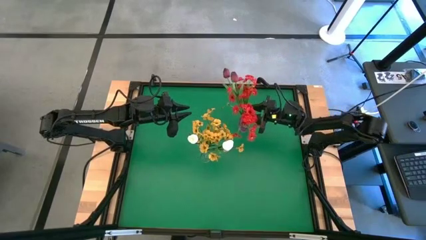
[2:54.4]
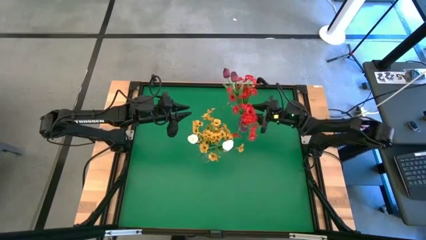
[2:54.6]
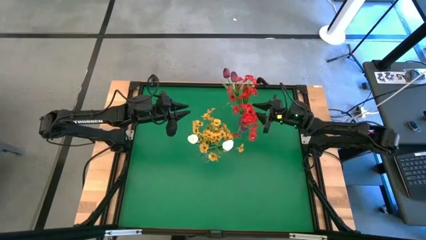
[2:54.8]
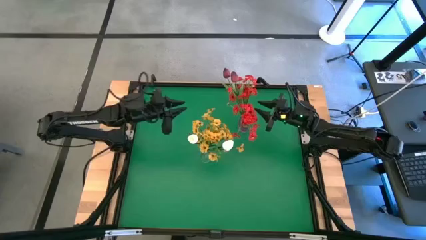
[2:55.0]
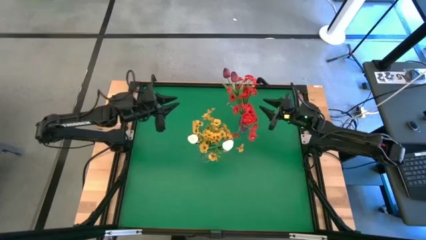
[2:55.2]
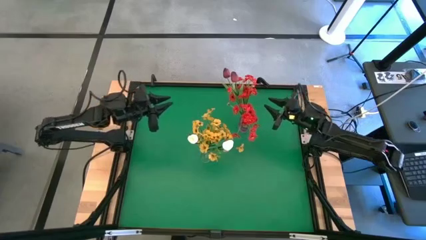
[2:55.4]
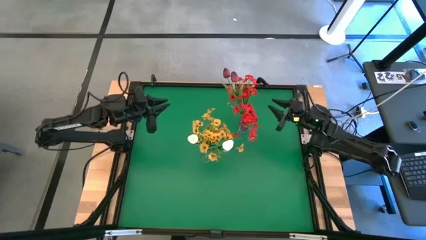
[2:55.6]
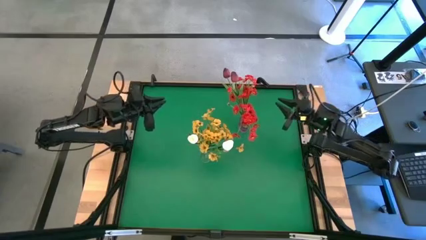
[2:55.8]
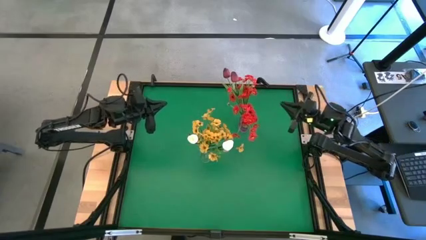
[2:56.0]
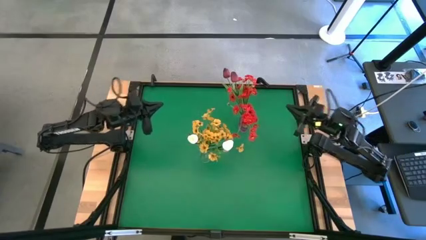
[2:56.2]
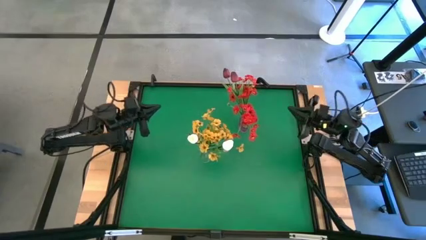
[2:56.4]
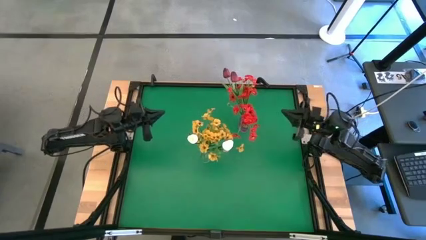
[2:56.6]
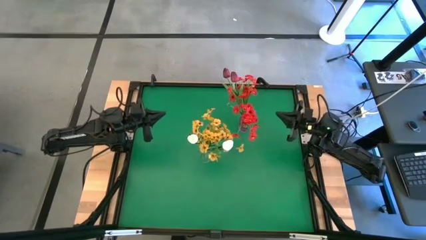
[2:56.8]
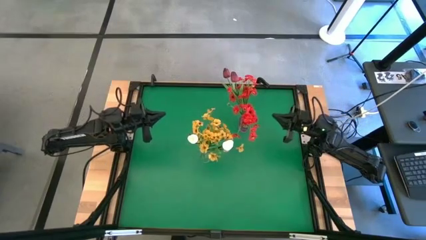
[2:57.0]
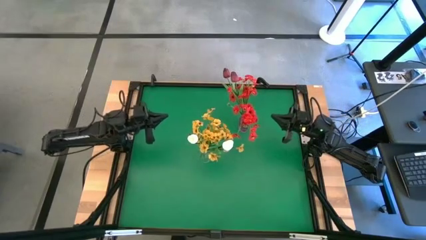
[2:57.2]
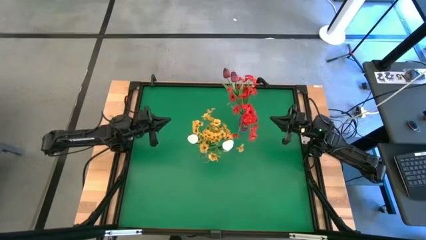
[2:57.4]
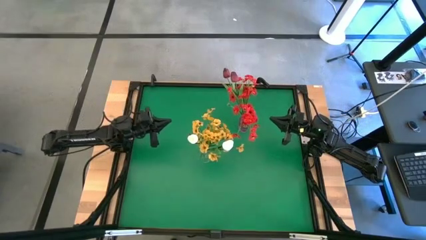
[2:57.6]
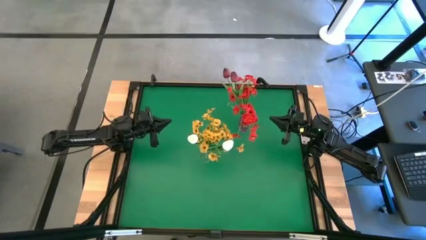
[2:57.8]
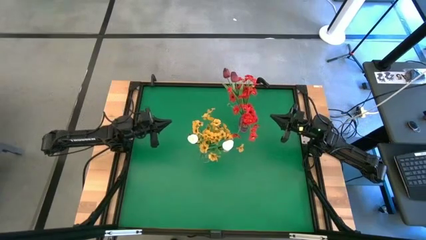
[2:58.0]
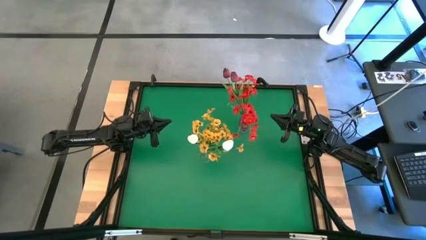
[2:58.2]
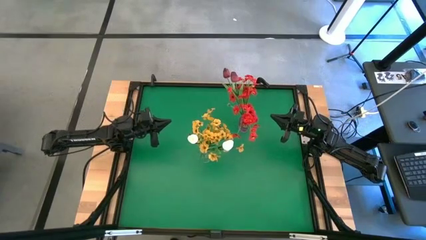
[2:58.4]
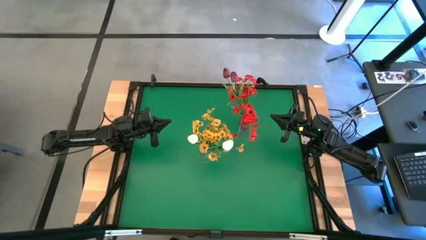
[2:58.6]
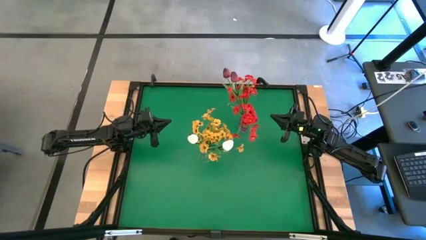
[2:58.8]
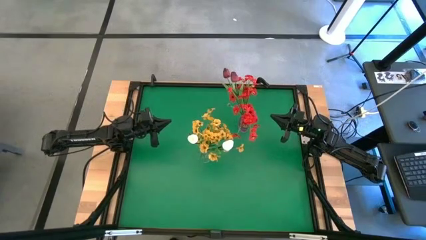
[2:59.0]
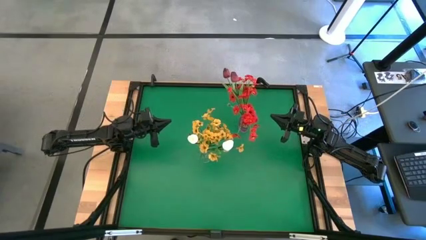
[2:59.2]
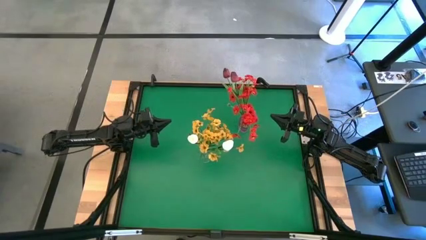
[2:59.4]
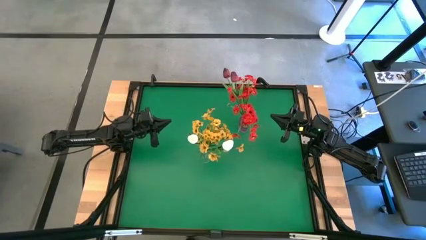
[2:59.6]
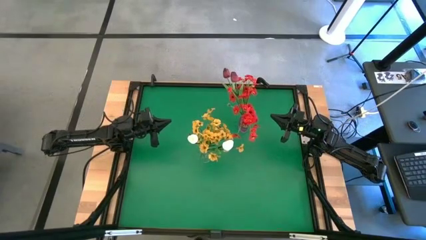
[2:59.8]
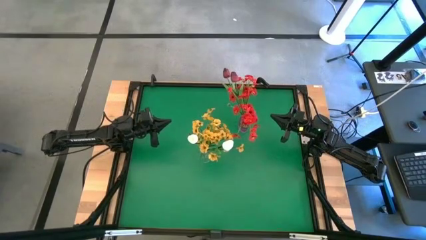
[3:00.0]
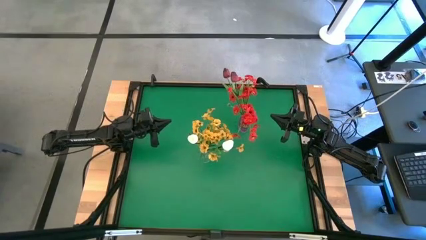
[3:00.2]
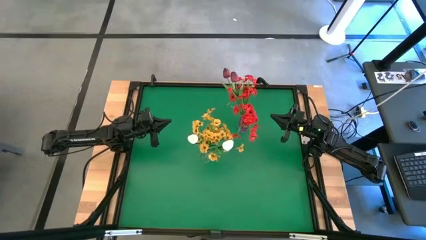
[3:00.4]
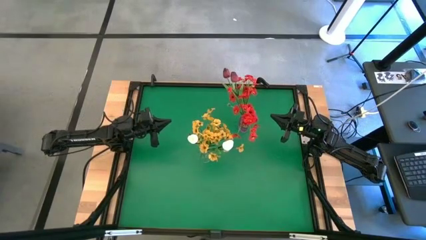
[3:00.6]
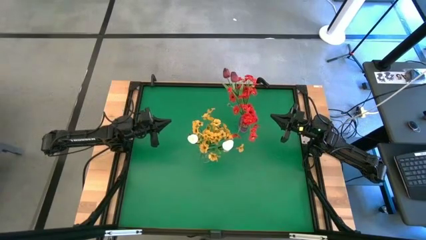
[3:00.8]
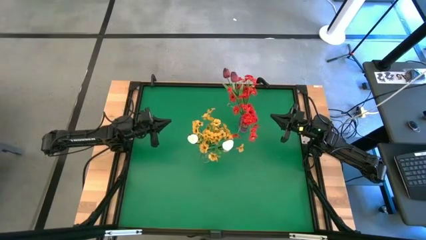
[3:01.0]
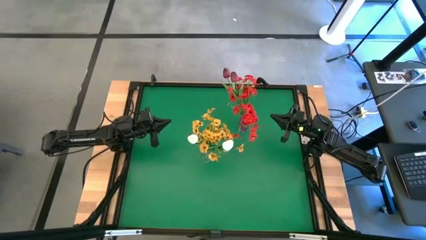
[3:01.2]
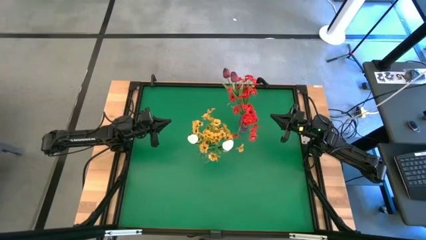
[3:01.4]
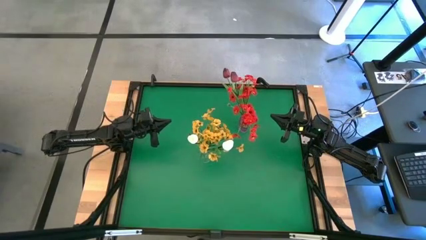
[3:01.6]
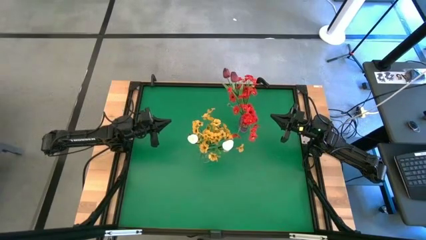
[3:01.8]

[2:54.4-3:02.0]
Task: Sort flowers into vase by color
Return to Home Position

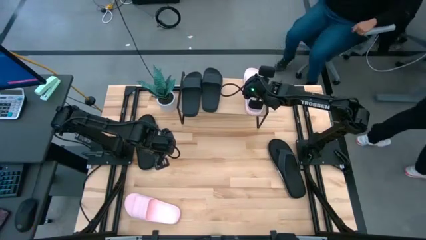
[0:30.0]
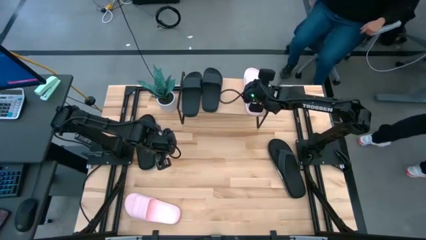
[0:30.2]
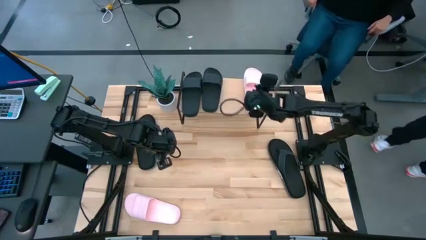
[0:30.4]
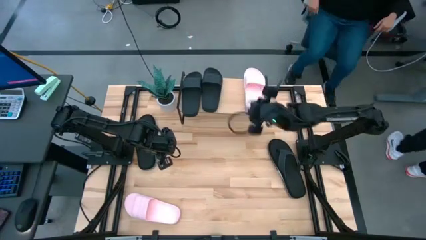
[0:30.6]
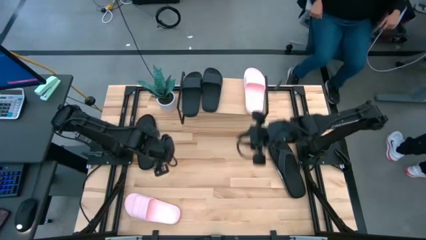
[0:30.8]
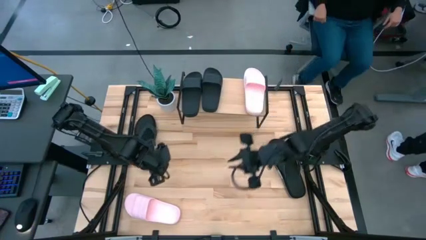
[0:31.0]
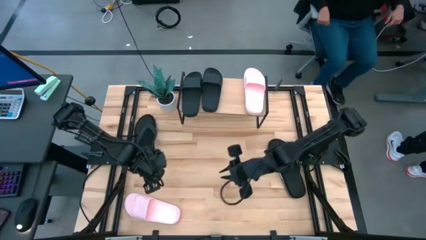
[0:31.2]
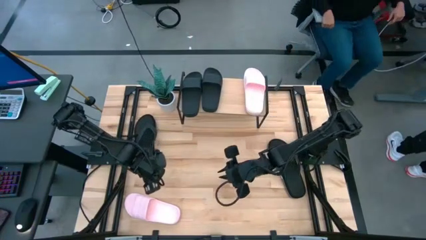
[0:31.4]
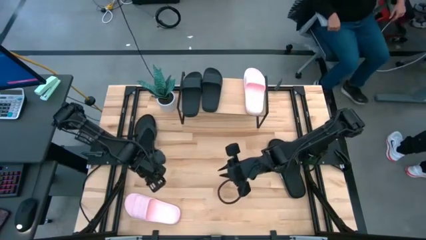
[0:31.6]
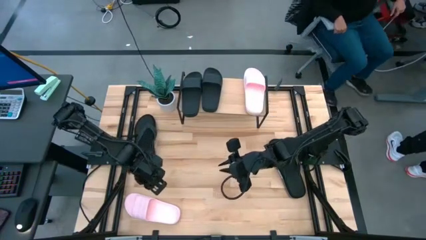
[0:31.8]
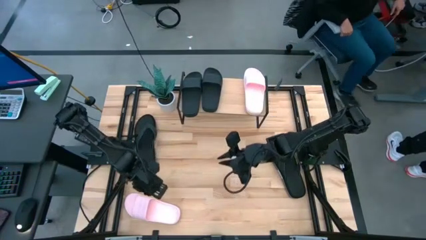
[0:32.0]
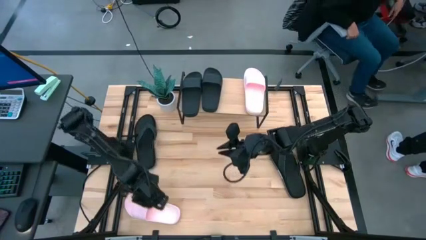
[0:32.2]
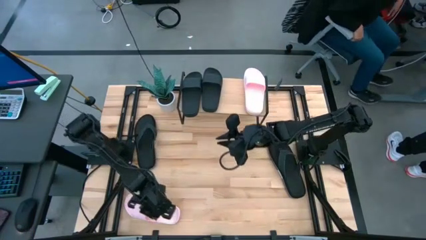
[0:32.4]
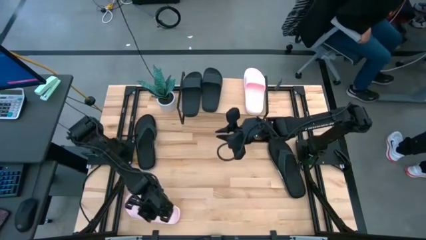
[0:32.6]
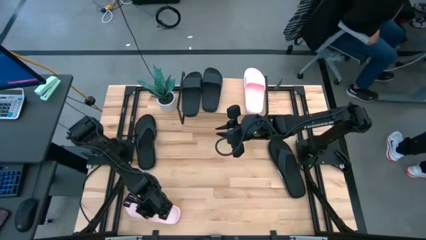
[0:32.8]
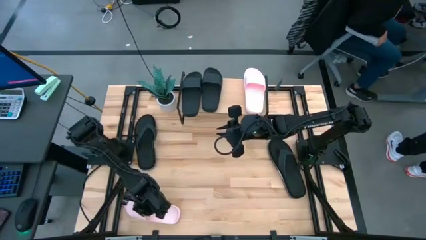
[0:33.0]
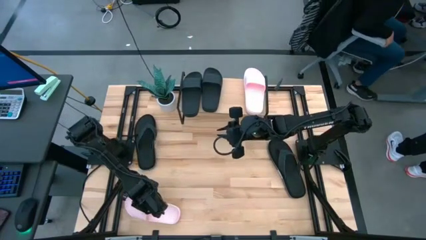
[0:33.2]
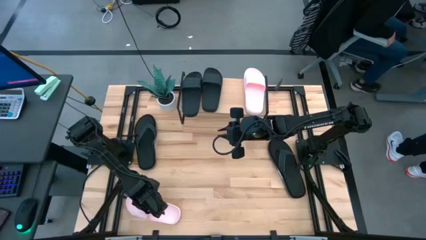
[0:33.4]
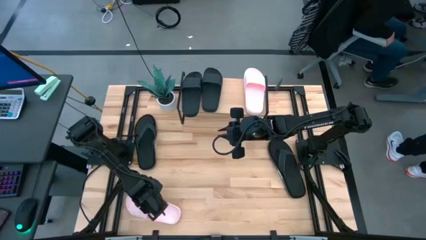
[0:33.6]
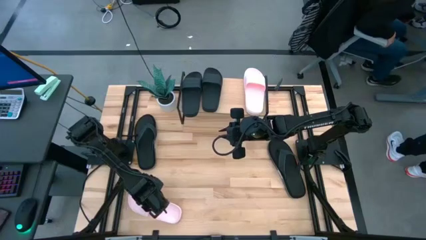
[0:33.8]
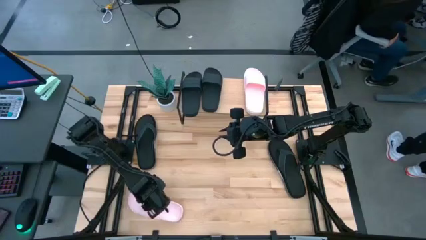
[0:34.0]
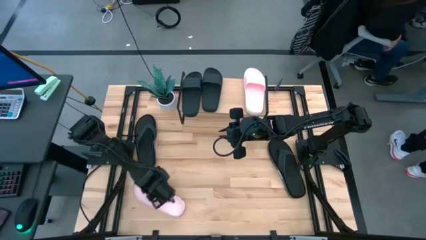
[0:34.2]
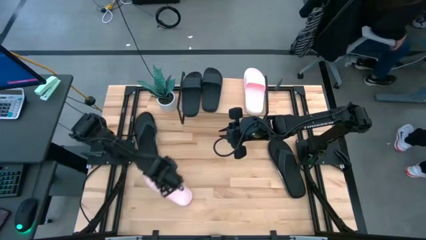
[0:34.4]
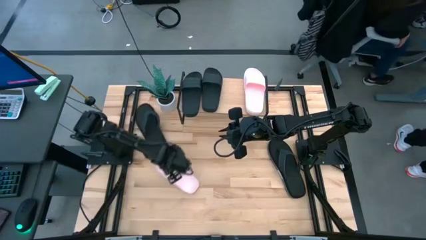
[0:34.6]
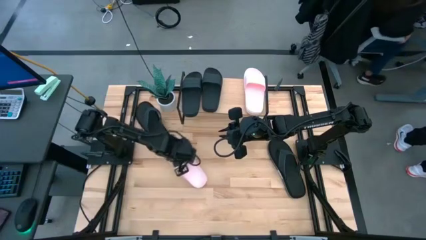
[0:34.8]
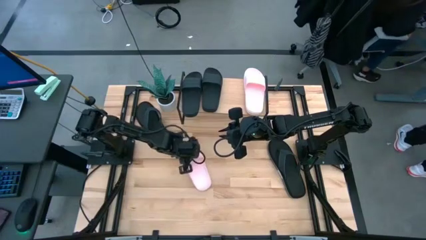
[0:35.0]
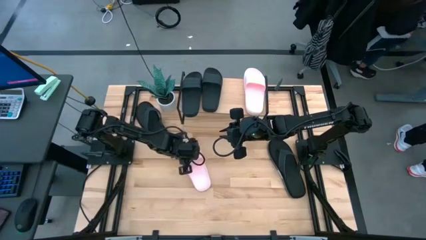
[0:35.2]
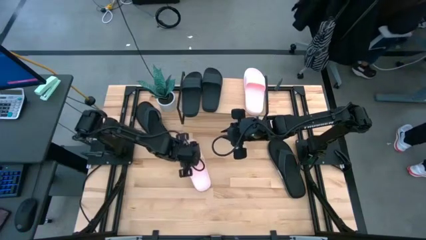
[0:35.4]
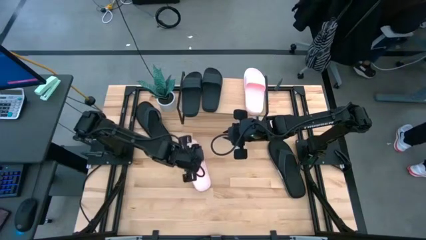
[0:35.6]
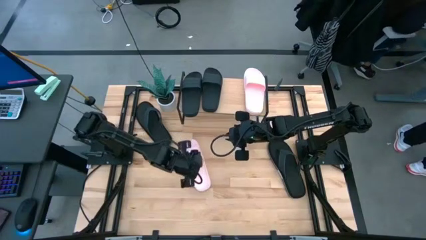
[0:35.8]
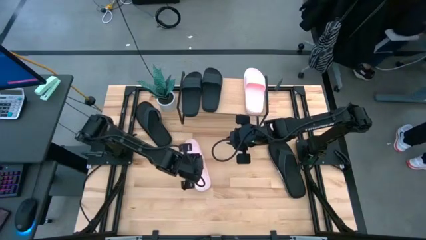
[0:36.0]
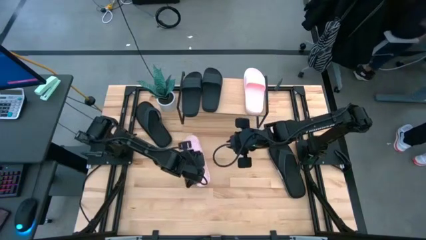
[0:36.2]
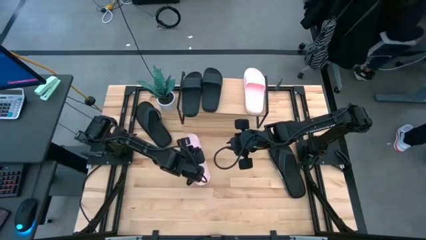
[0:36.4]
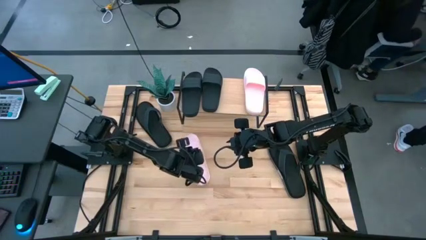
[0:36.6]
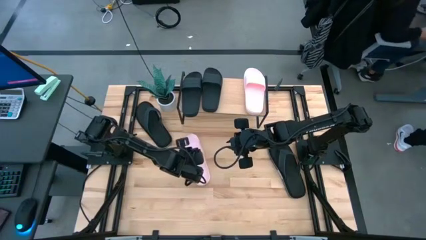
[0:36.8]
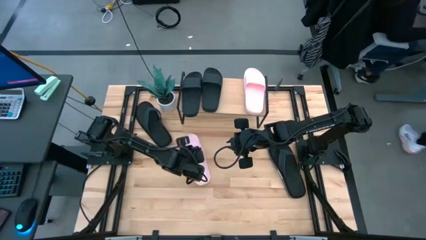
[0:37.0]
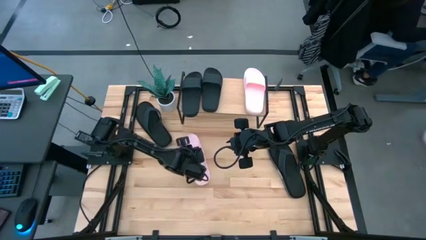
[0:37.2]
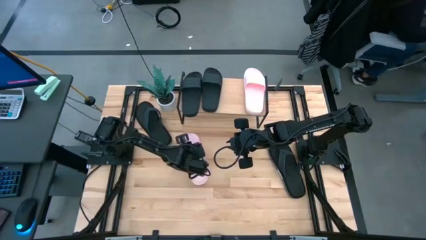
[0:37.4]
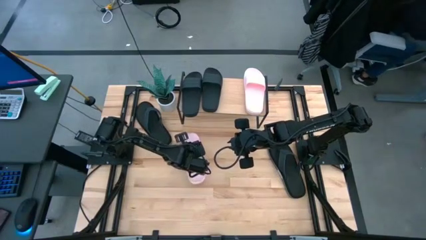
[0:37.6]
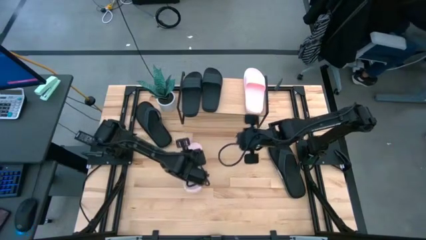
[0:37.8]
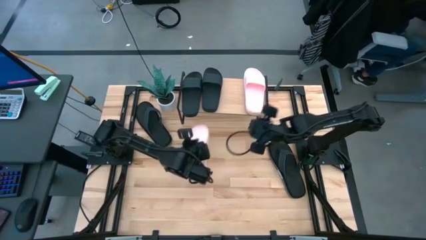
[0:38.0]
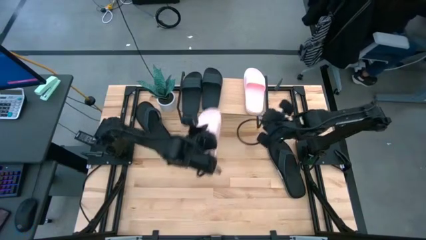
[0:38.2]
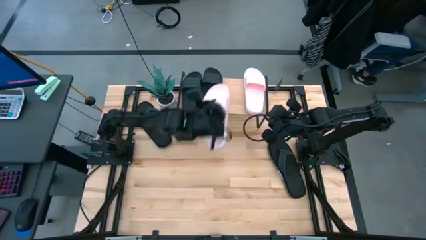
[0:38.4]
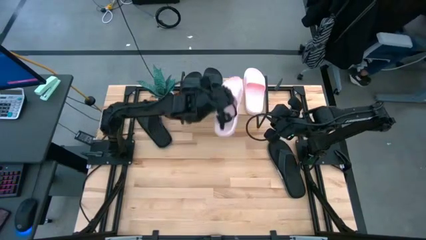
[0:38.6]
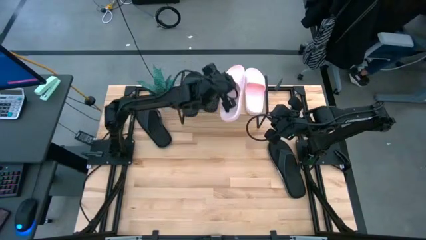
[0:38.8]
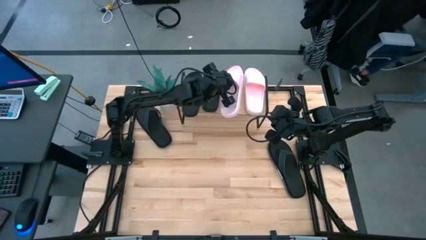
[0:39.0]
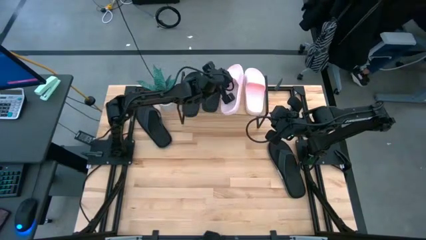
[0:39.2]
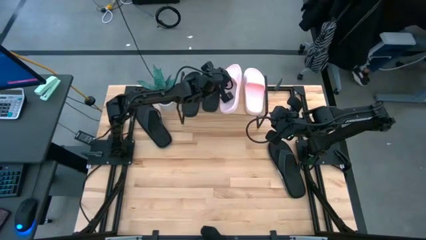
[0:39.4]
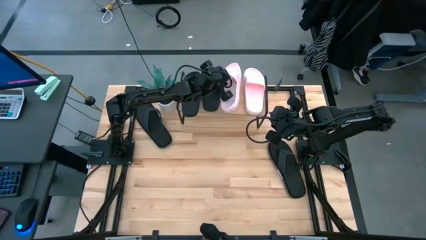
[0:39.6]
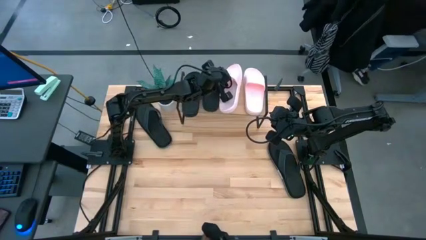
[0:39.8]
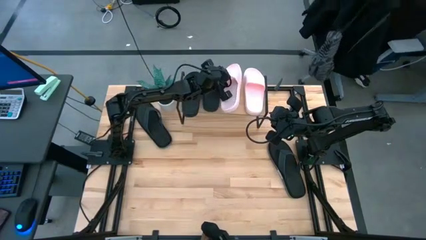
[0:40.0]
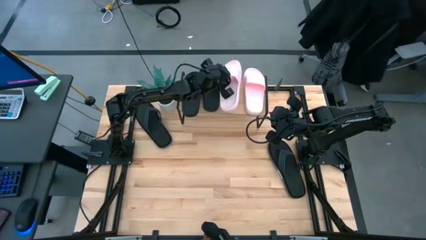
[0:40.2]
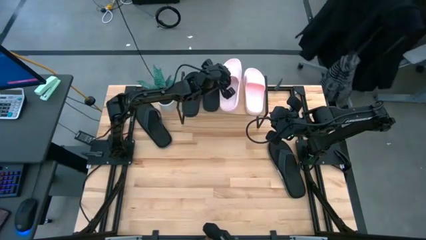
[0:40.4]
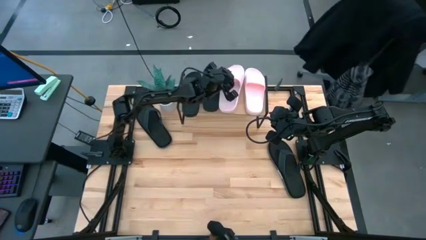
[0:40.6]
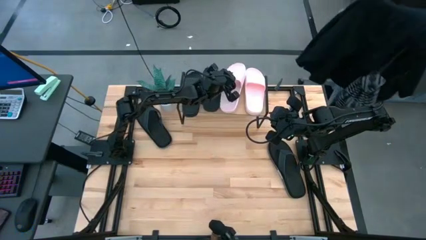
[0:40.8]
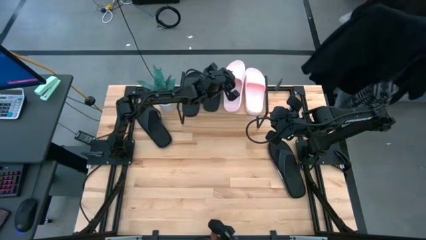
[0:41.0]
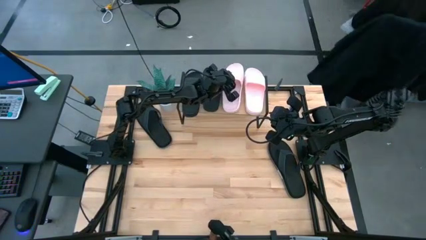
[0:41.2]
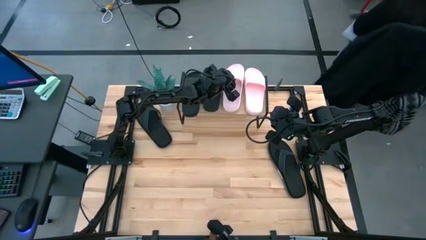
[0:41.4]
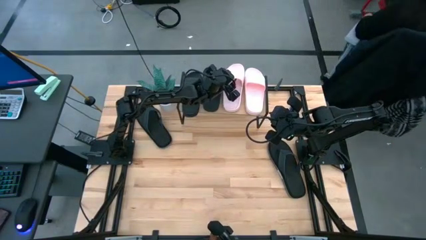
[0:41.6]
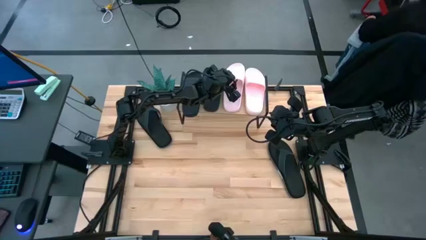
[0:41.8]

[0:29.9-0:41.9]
Task: Pick and place slides into the shelf
Put the pink slide on the shelf
